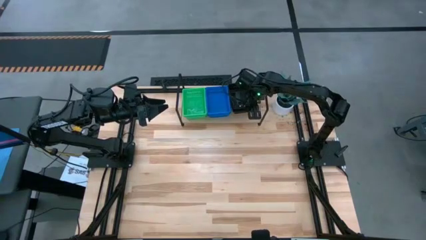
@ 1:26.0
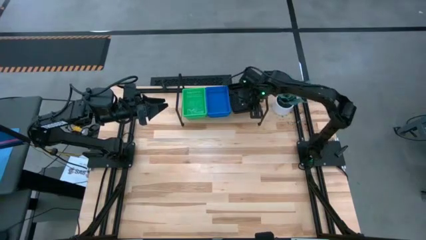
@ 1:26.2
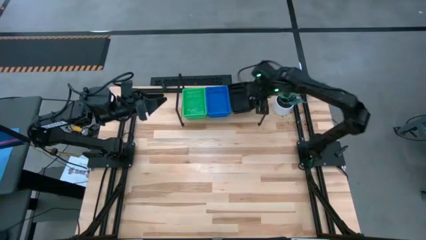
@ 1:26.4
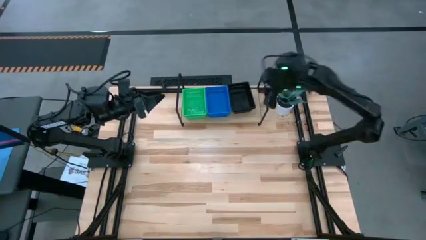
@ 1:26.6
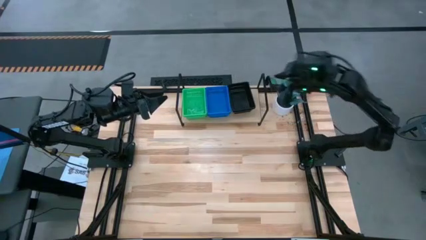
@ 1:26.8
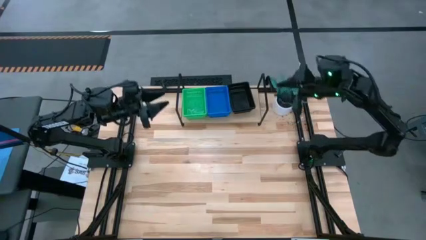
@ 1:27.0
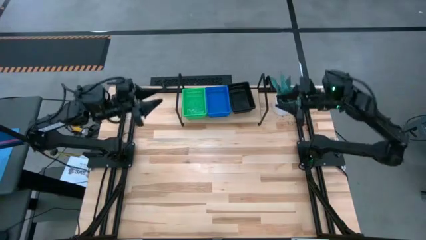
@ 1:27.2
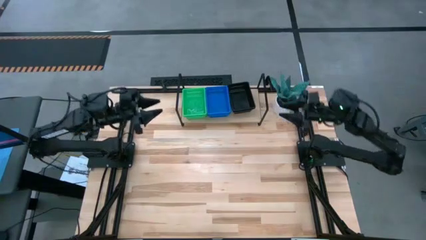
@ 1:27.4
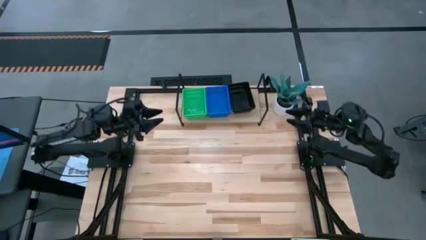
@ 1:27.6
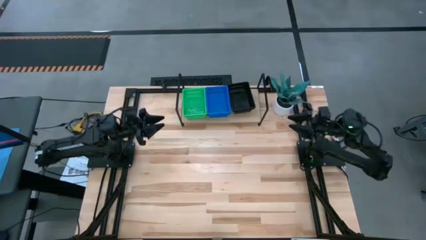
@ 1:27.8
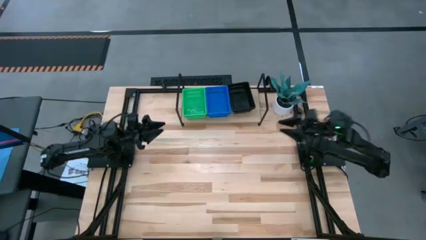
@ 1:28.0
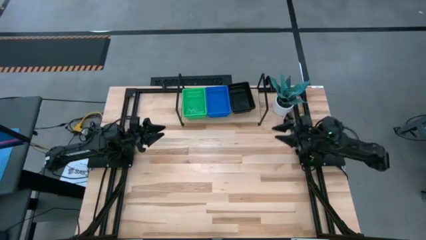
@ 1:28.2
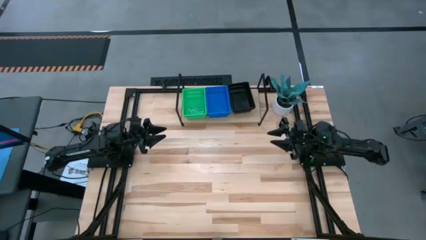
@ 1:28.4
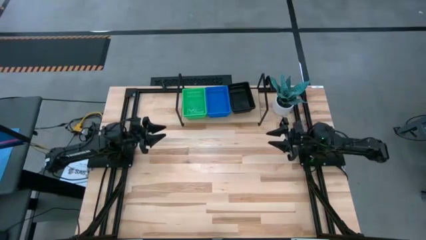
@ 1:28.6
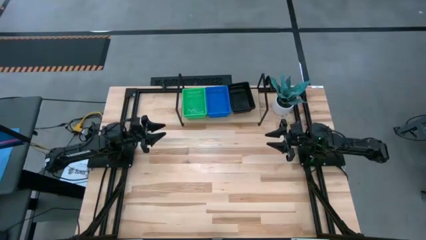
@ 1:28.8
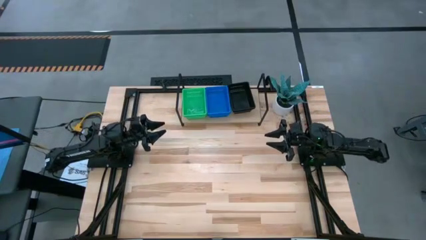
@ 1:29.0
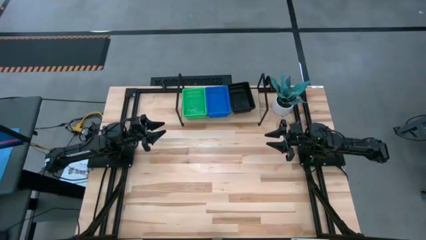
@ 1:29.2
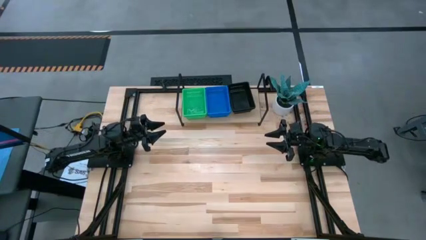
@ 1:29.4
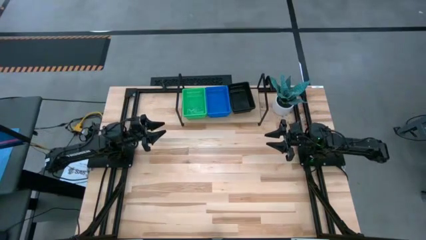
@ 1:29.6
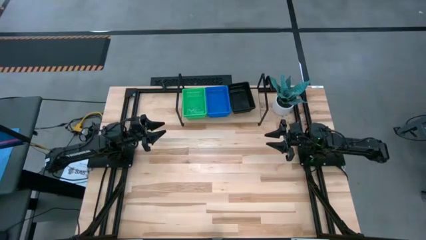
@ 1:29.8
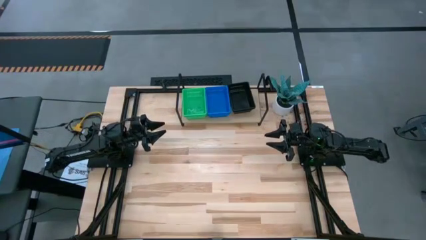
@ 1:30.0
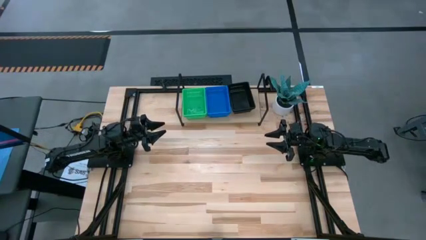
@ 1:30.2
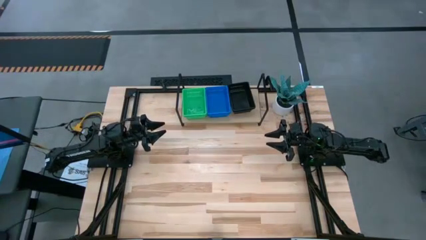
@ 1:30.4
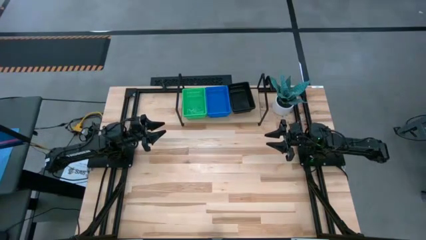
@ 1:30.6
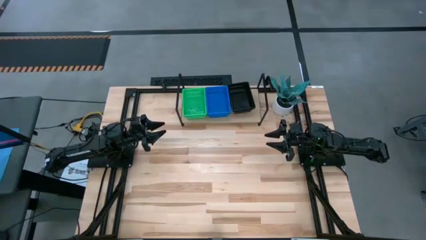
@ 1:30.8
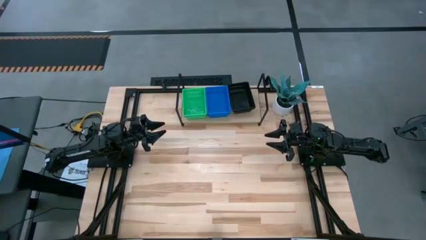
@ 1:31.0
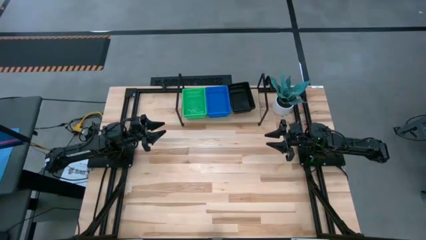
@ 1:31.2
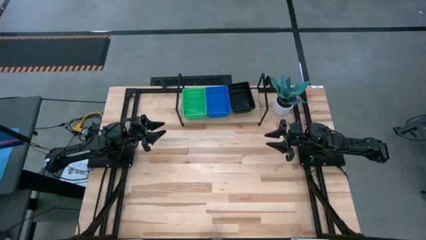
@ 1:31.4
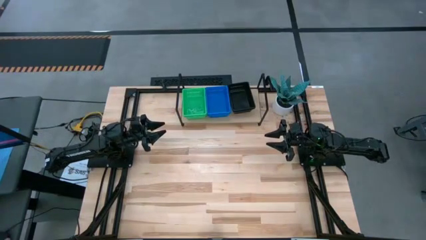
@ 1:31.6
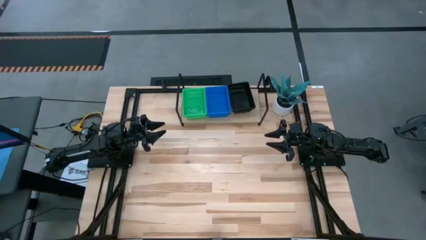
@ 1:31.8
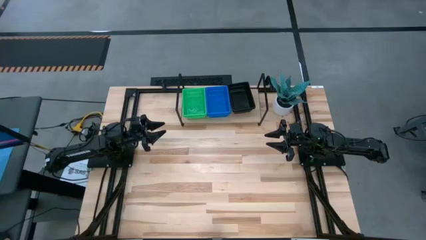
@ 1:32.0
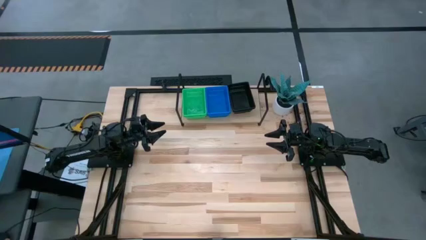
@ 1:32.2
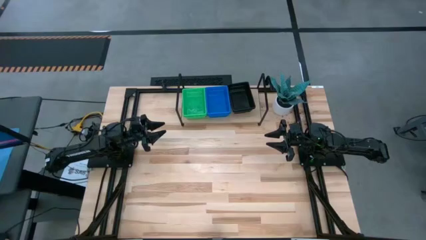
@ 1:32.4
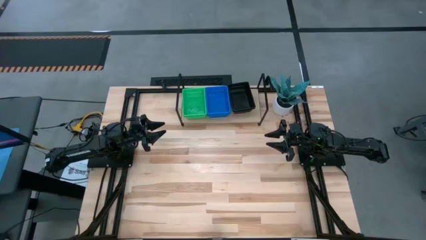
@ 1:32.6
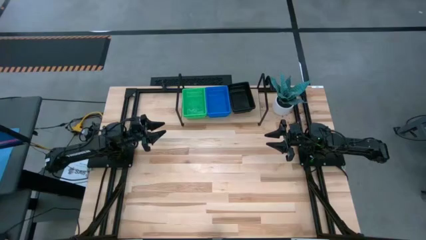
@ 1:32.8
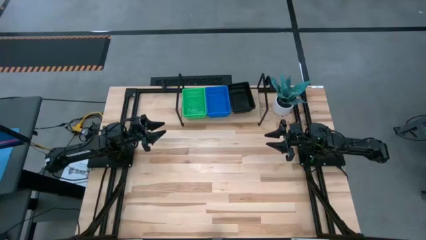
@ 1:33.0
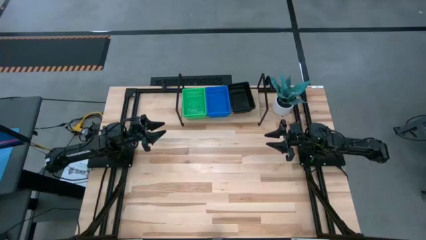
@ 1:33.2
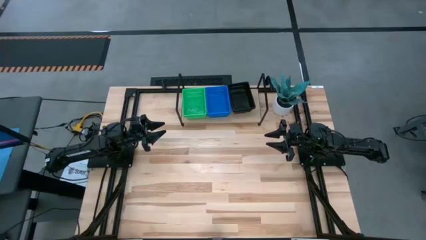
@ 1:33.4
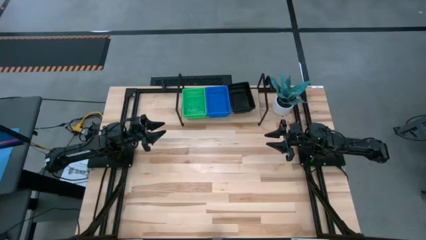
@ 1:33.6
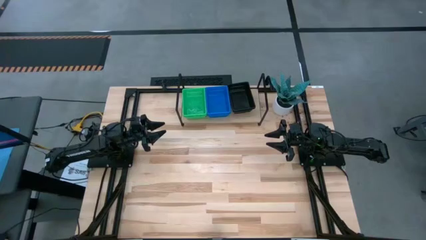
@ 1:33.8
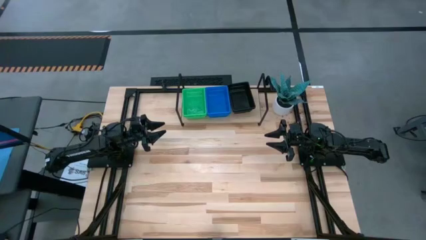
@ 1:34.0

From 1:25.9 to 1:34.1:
Task: Stack baskets on shelf by color
Return to Home Position
